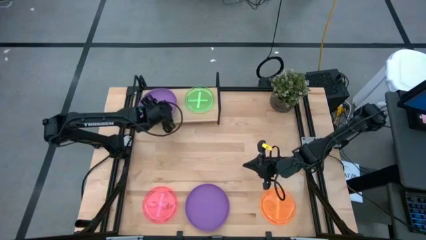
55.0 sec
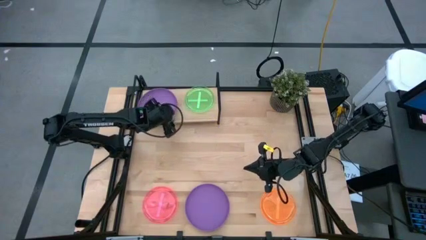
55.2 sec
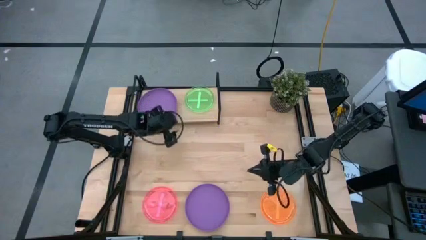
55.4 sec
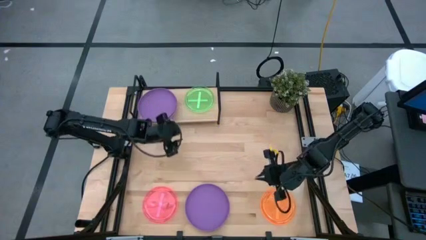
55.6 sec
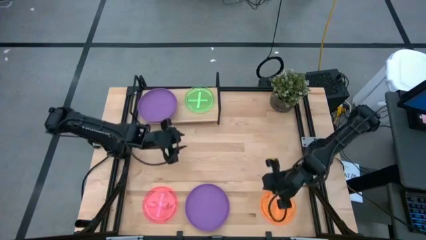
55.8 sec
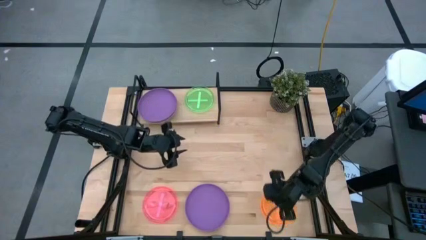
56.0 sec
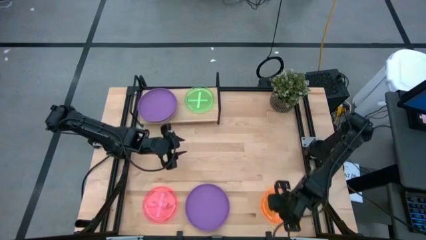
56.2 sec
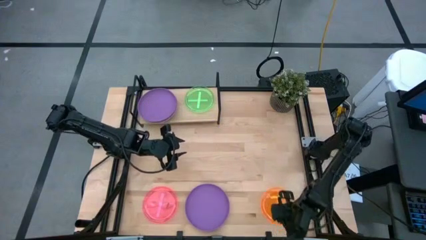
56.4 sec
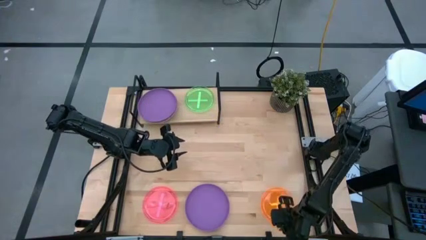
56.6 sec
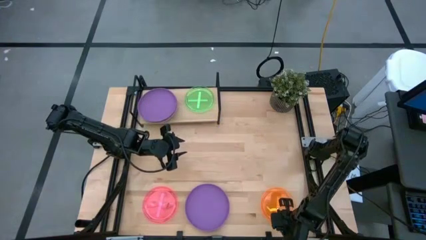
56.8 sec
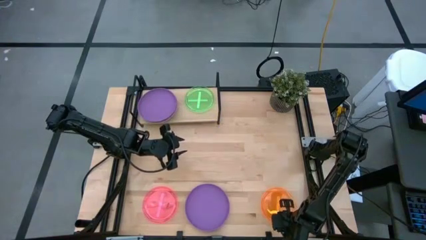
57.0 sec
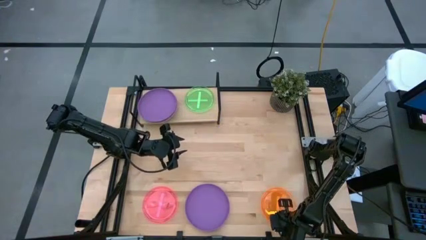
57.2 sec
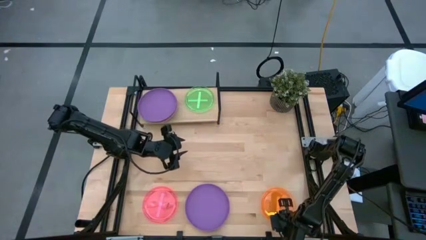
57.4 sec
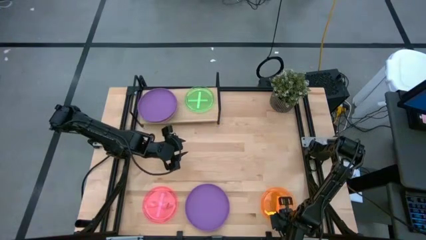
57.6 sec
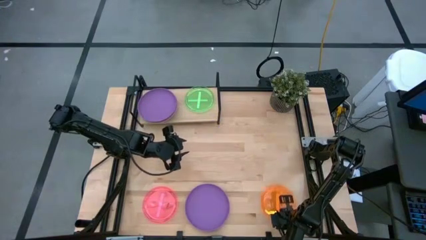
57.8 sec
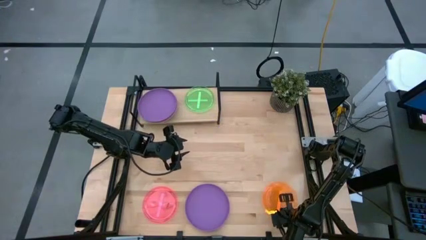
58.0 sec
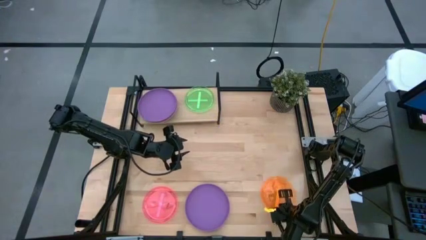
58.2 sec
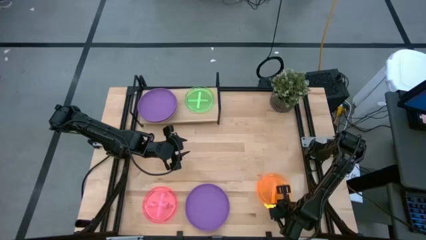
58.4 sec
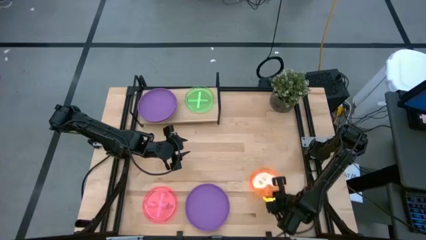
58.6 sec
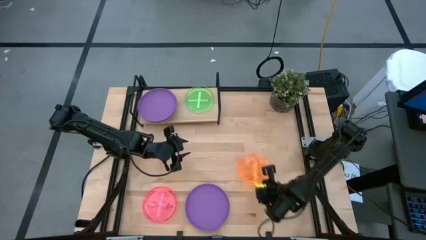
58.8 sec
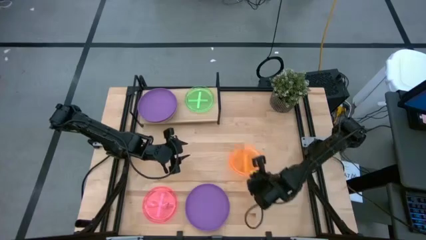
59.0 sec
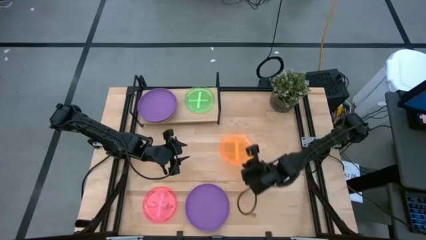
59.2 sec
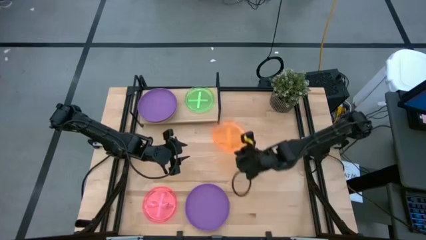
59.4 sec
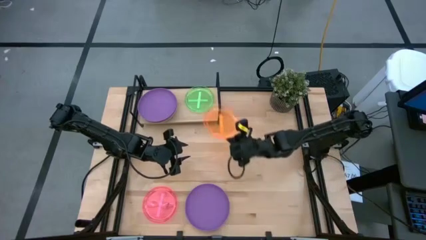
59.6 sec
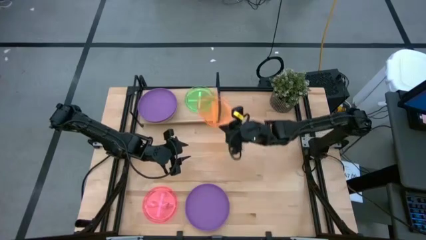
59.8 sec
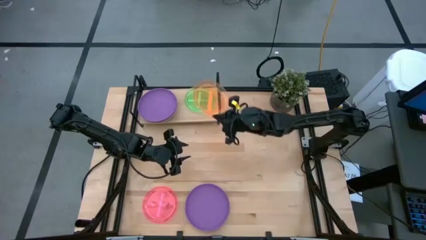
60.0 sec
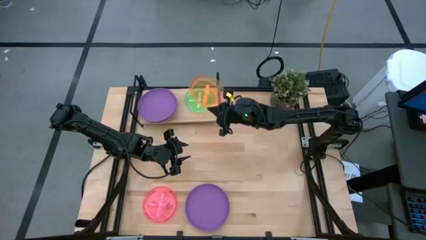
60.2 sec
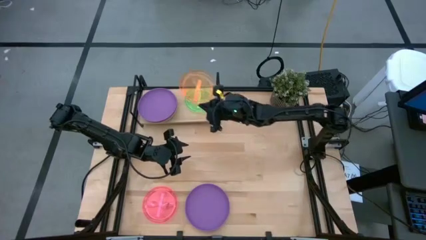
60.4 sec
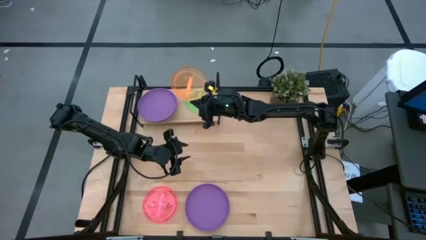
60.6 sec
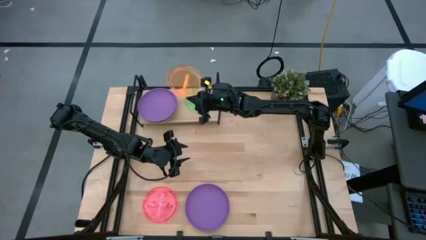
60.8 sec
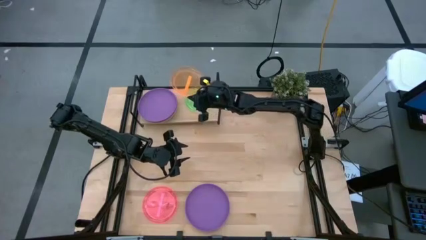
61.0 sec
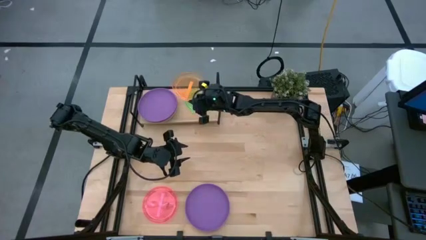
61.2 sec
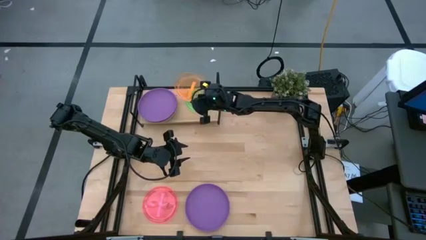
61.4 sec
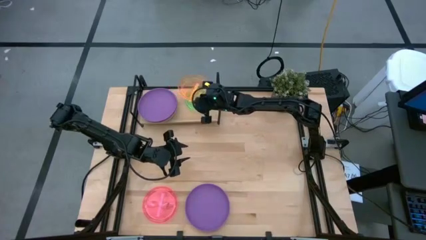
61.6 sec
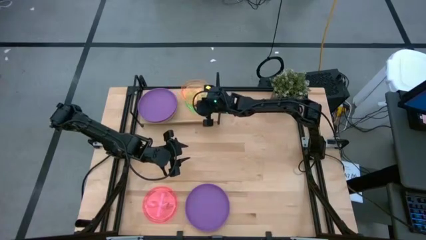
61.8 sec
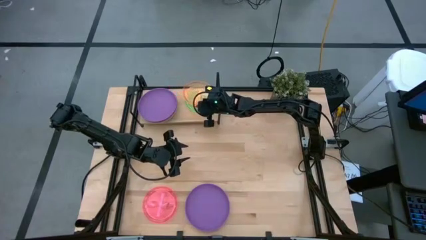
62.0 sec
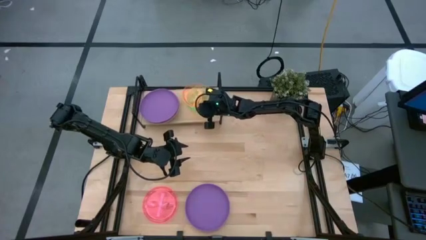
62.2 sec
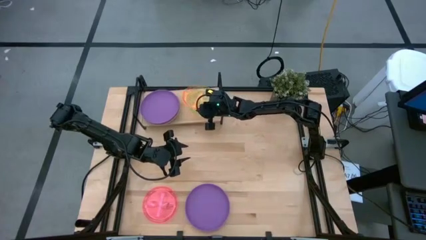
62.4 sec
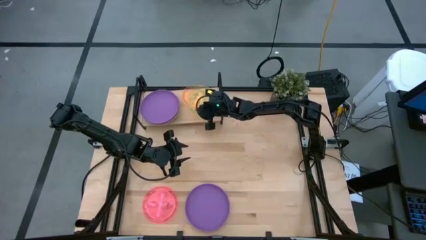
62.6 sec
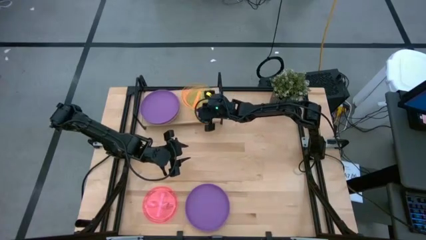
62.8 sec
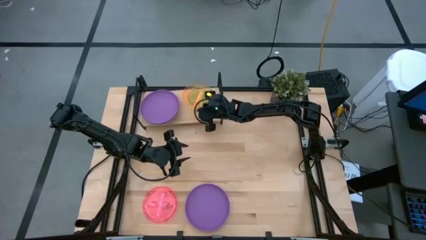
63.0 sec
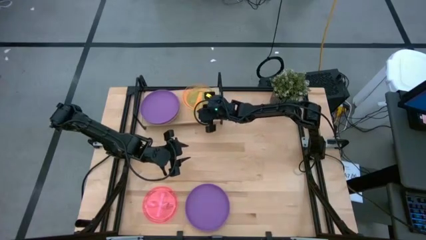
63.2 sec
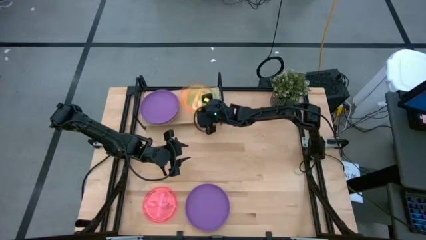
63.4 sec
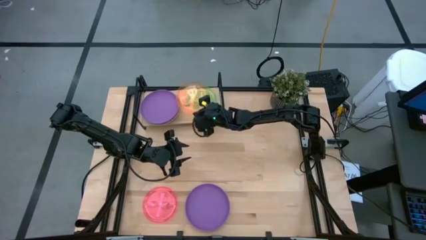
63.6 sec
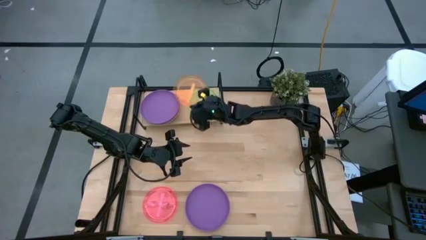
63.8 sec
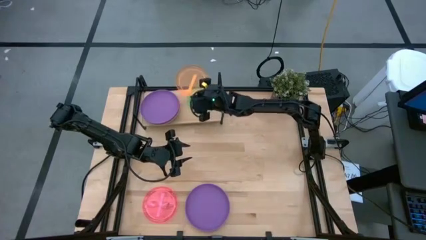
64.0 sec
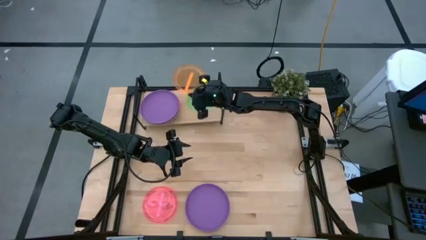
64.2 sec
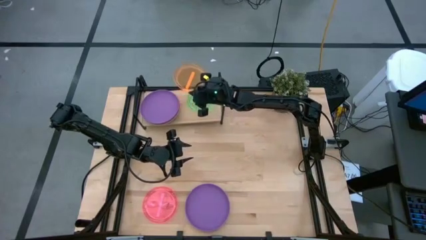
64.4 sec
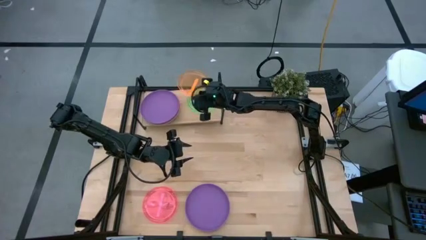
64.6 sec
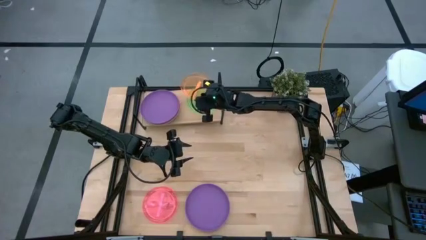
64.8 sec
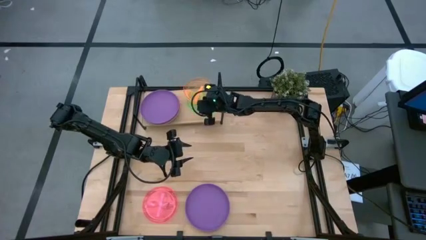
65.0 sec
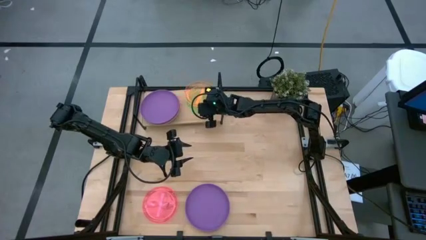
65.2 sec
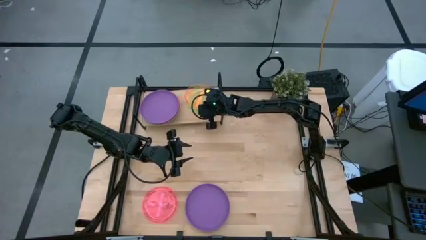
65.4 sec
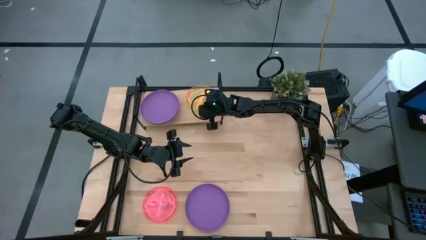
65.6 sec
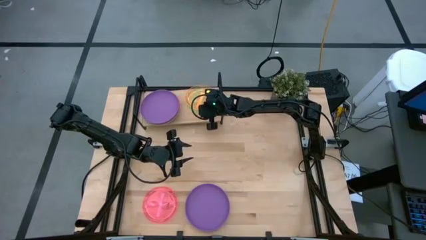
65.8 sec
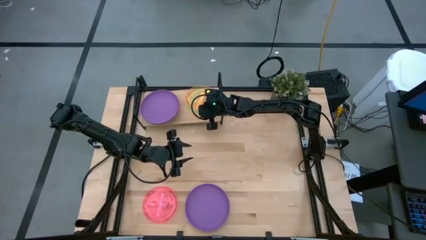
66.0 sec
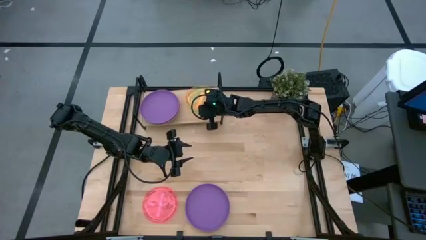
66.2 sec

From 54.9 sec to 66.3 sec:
Task: Place and stack plates onto a shelf
Stack the orange transparent plate into the green transparent plate on the shelf

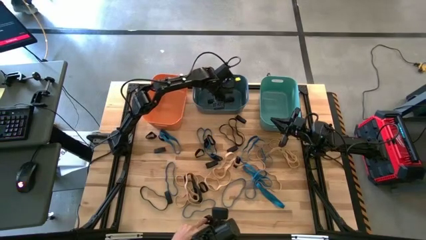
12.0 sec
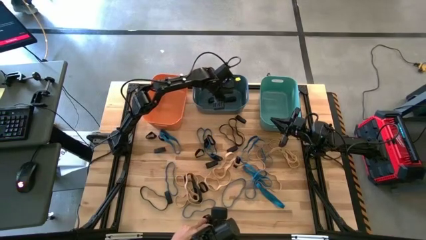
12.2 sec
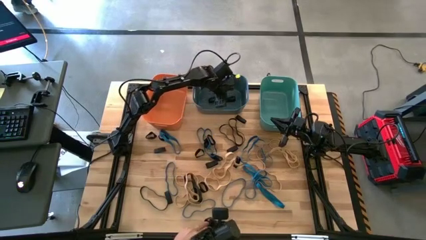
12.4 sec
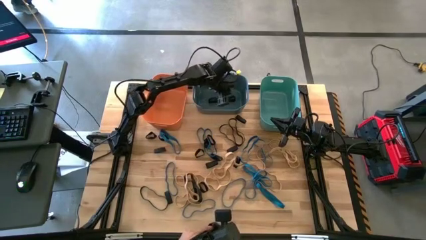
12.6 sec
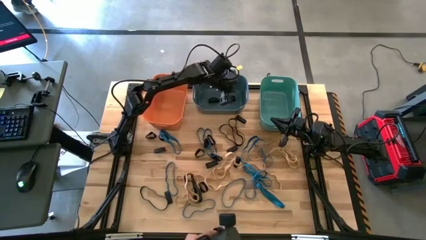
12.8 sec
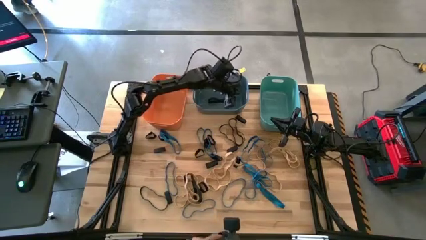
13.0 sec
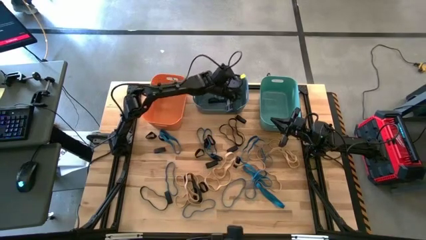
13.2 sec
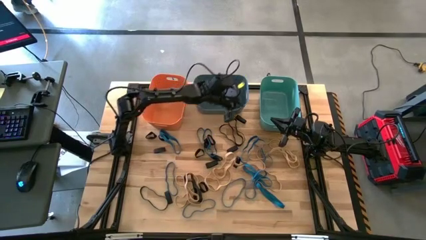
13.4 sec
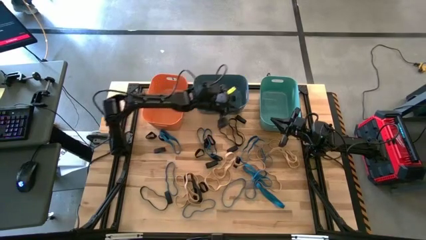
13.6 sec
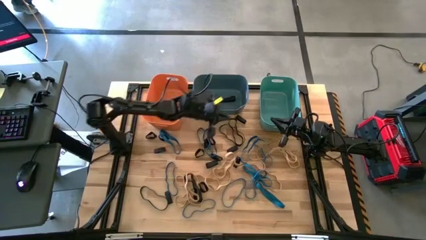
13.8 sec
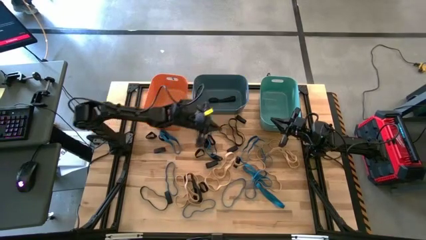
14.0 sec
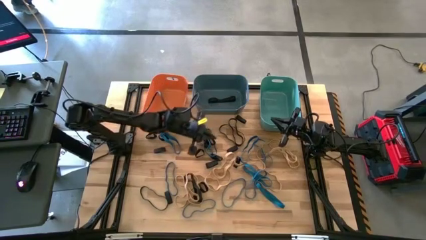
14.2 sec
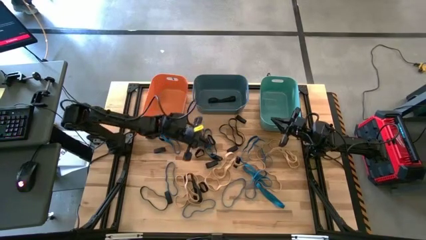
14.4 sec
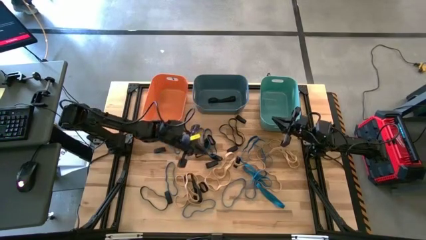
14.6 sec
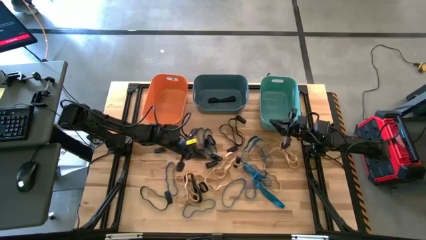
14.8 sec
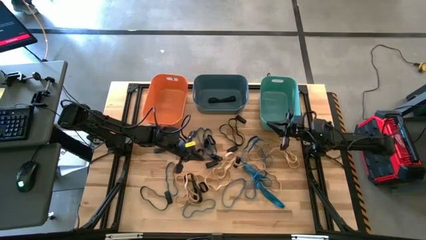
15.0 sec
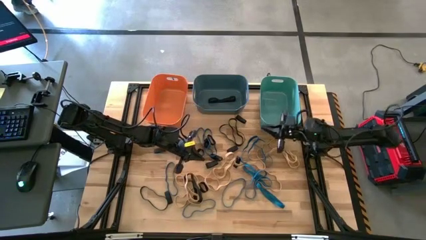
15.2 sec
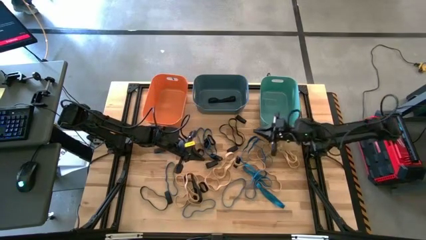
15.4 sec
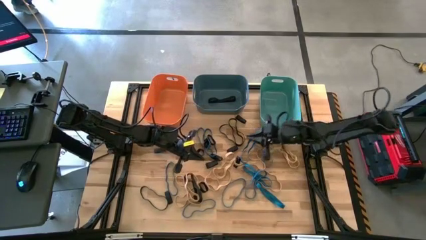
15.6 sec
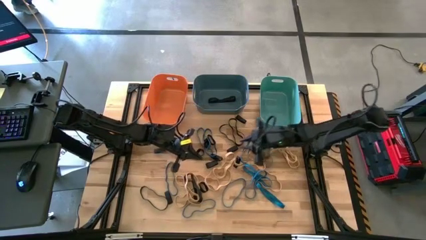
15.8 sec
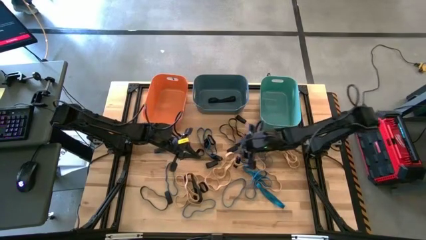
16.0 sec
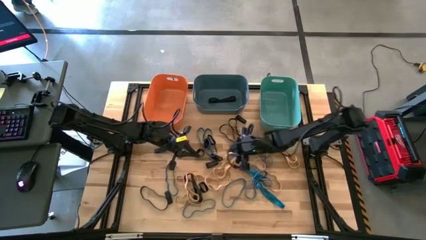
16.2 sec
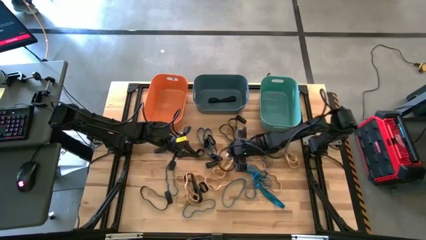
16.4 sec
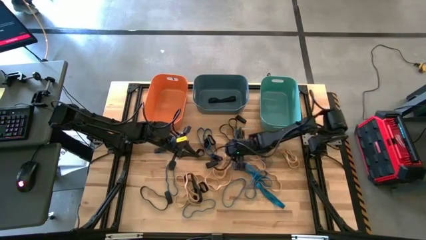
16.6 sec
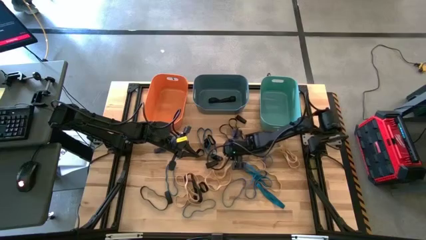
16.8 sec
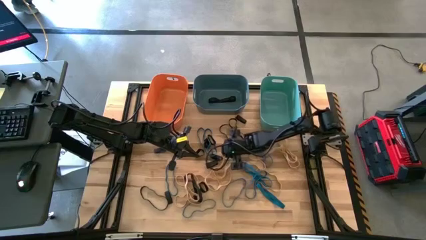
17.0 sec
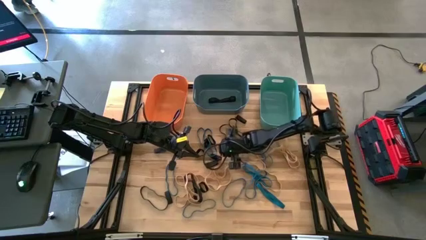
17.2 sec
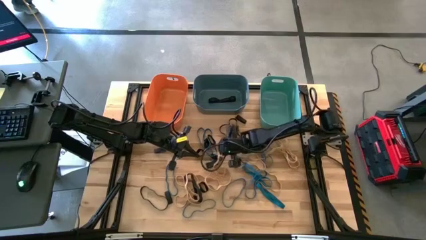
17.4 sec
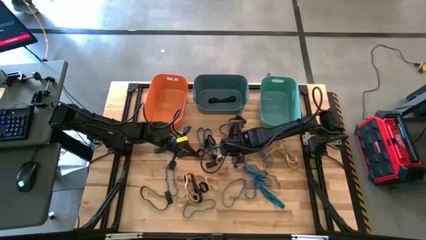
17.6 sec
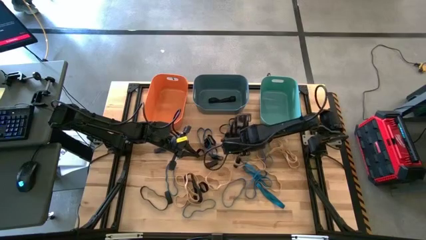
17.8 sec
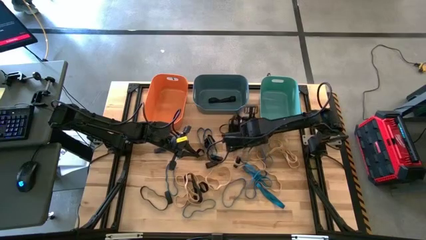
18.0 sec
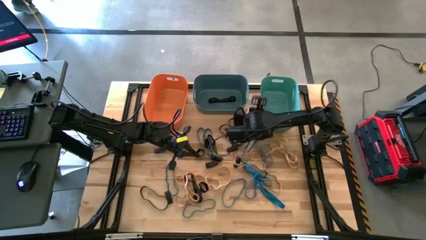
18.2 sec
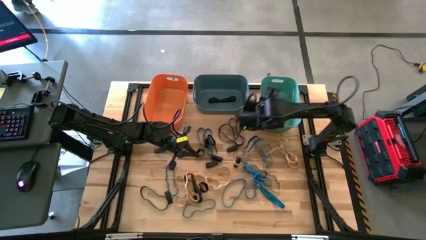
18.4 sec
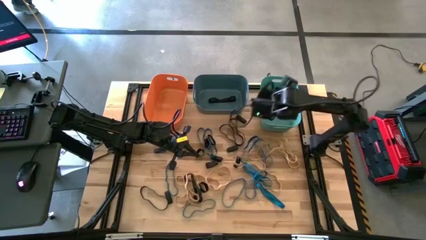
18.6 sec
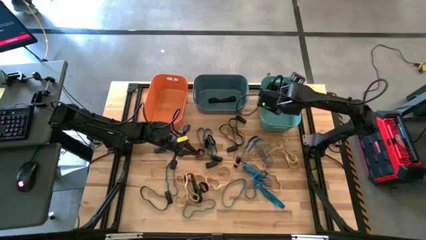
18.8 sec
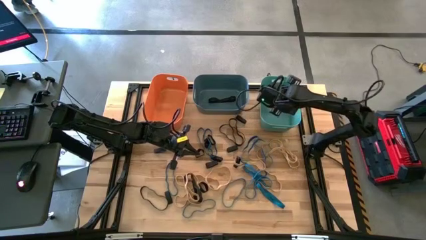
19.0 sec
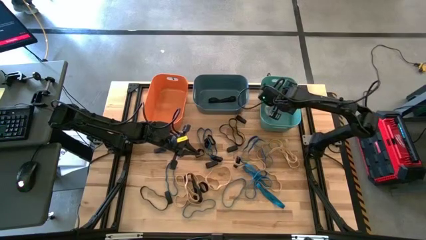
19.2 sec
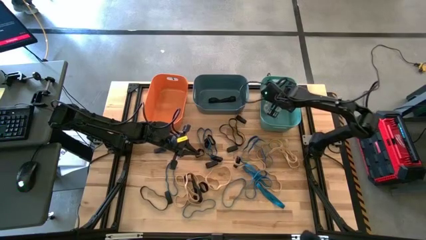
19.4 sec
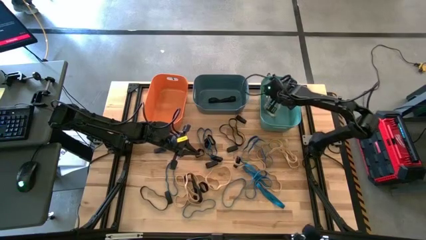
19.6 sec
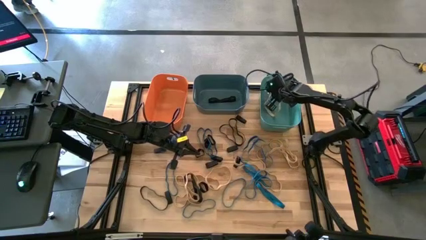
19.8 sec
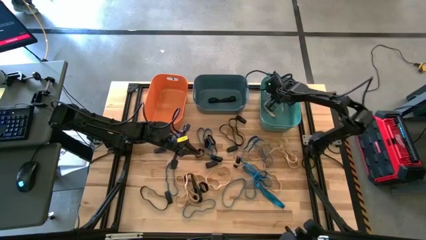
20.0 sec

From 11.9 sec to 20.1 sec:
Task: Sort rubber bands into baskets
Put the brown rubber band into the green bin
